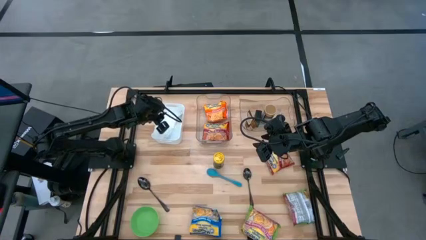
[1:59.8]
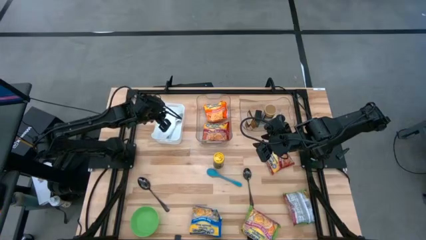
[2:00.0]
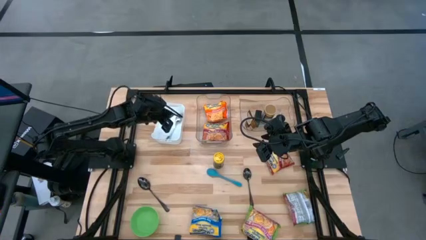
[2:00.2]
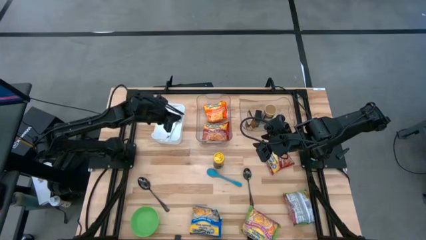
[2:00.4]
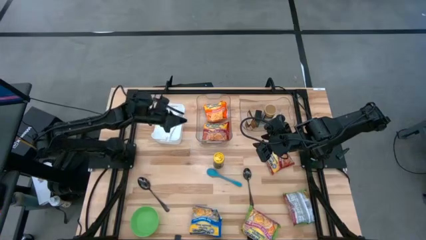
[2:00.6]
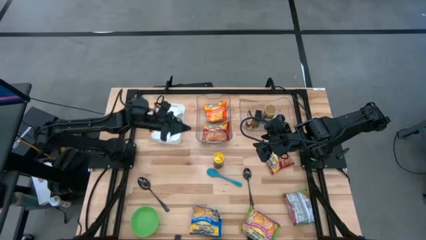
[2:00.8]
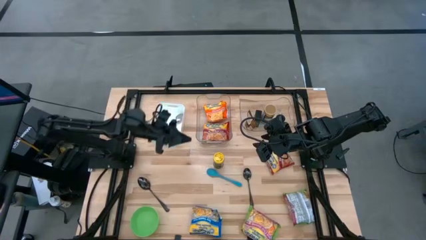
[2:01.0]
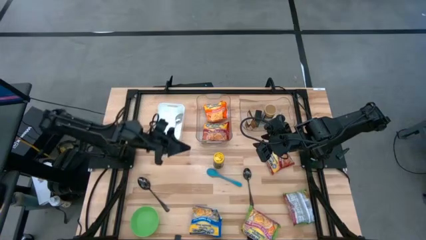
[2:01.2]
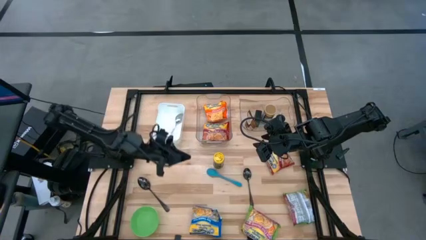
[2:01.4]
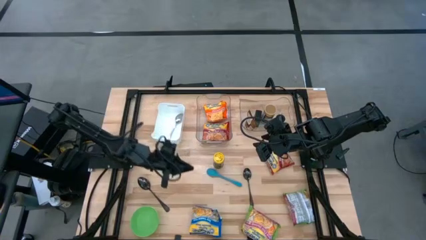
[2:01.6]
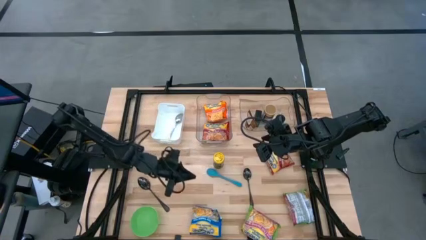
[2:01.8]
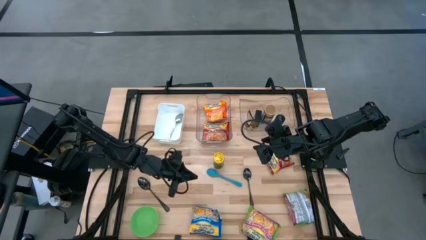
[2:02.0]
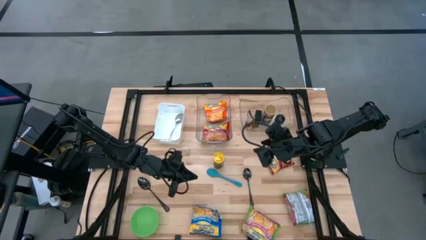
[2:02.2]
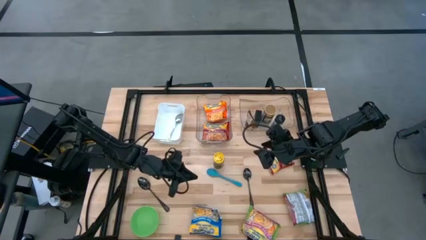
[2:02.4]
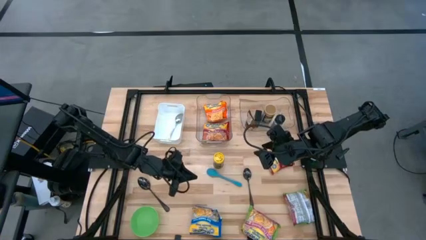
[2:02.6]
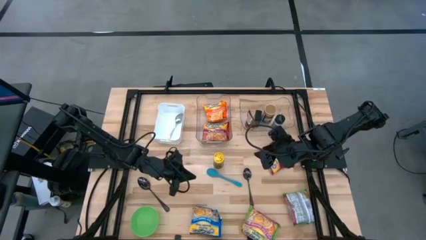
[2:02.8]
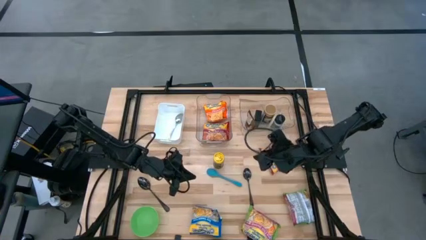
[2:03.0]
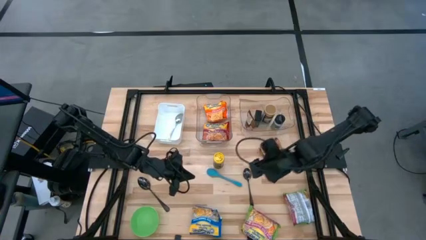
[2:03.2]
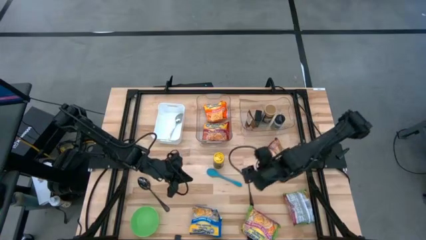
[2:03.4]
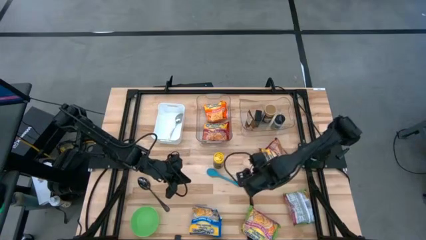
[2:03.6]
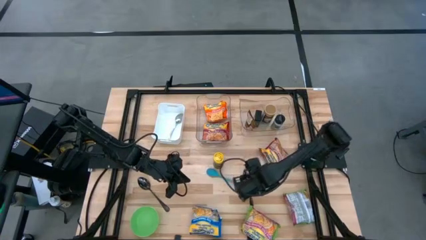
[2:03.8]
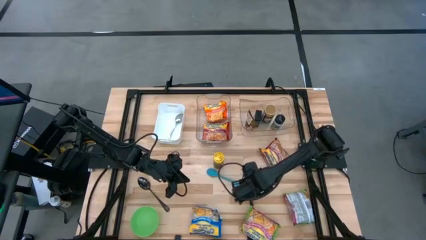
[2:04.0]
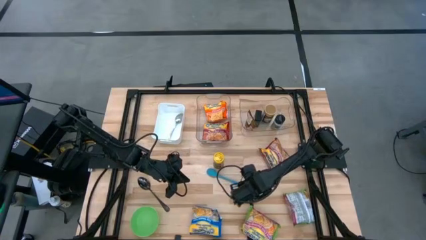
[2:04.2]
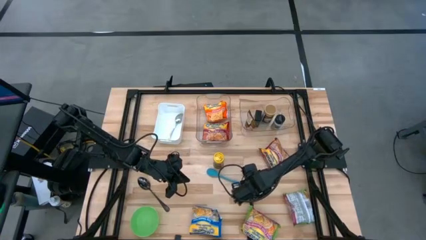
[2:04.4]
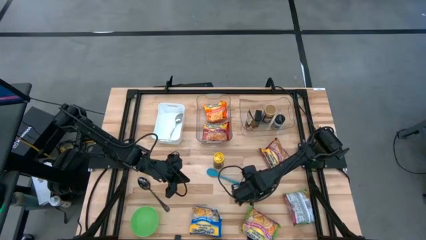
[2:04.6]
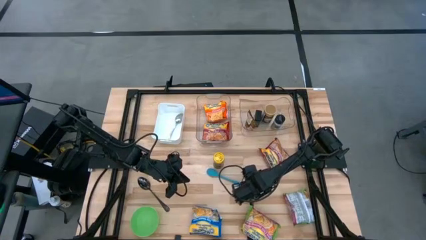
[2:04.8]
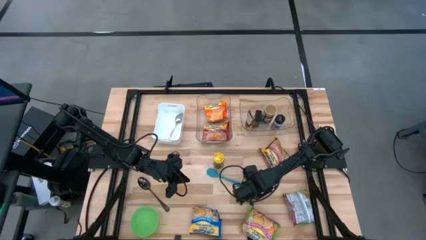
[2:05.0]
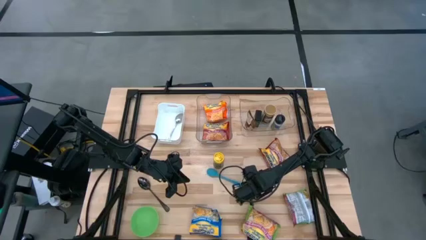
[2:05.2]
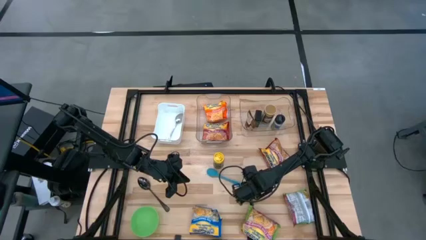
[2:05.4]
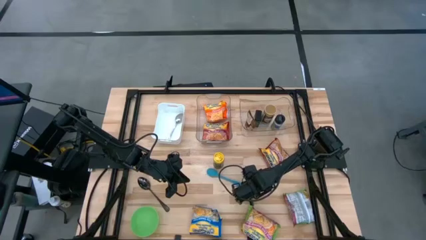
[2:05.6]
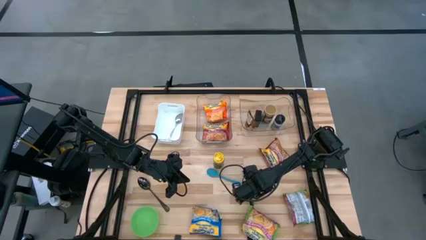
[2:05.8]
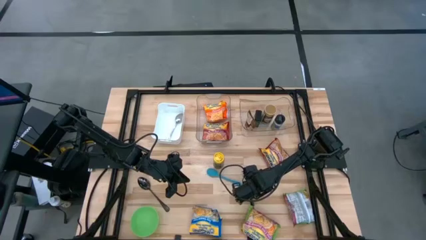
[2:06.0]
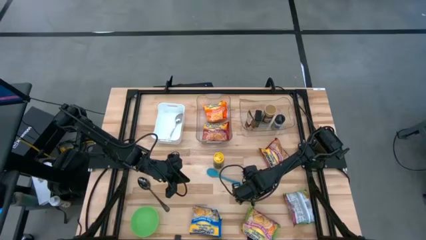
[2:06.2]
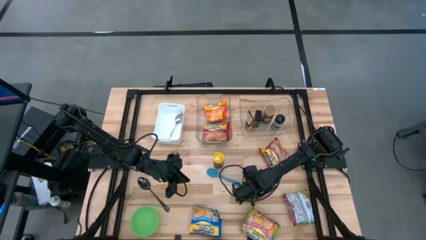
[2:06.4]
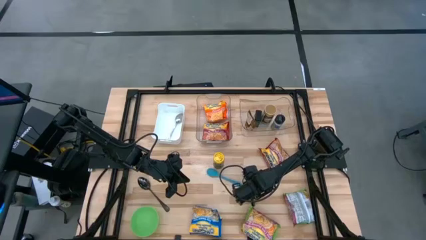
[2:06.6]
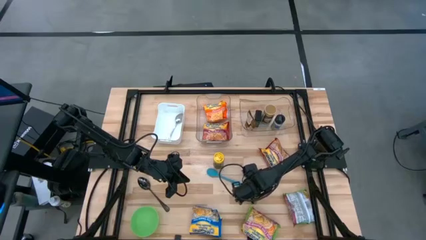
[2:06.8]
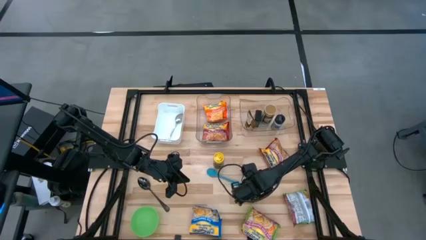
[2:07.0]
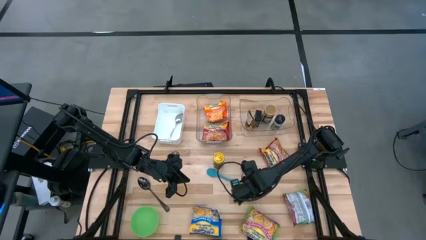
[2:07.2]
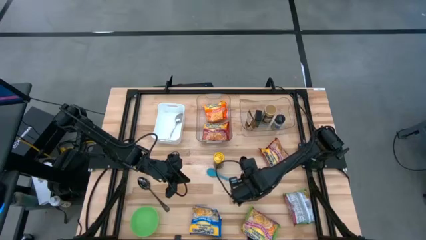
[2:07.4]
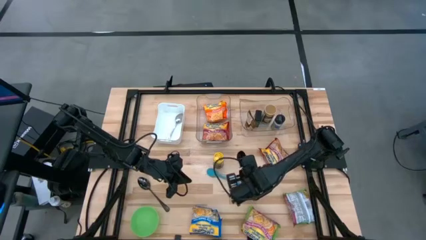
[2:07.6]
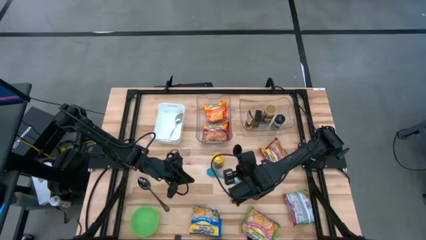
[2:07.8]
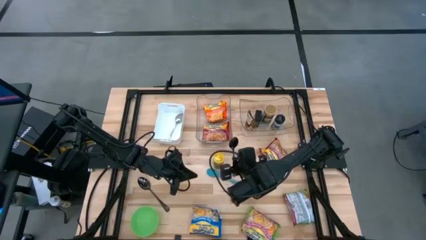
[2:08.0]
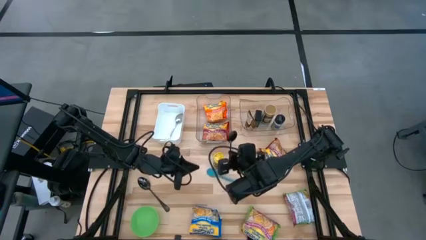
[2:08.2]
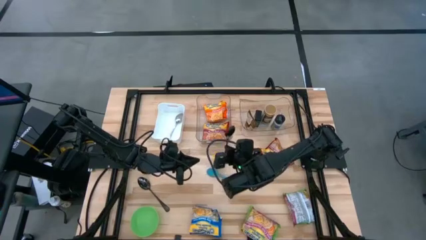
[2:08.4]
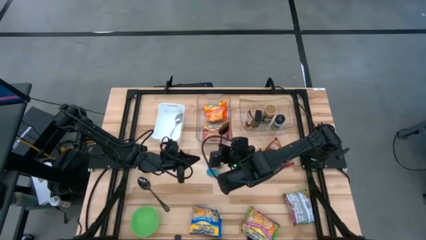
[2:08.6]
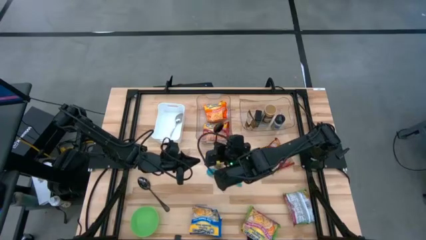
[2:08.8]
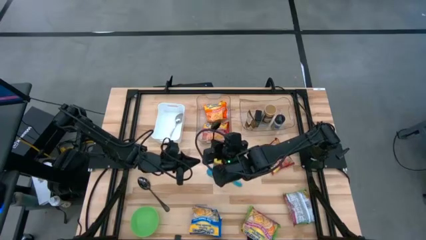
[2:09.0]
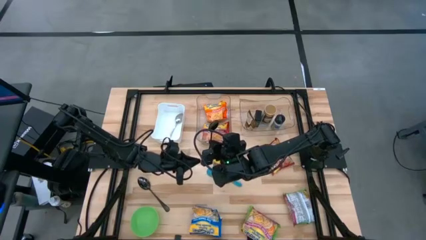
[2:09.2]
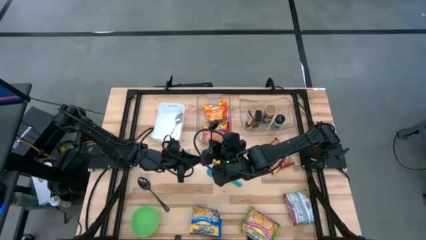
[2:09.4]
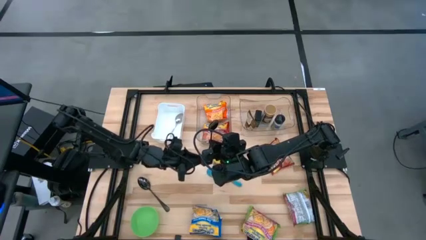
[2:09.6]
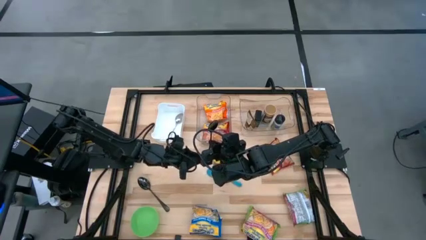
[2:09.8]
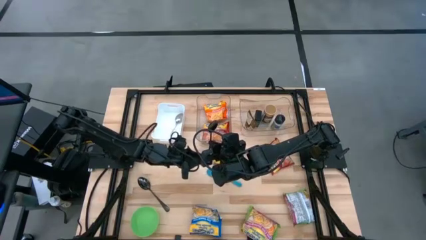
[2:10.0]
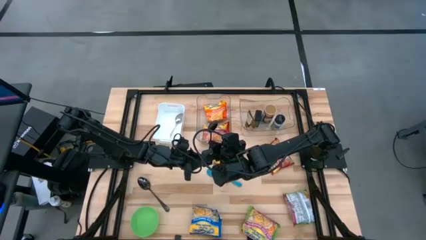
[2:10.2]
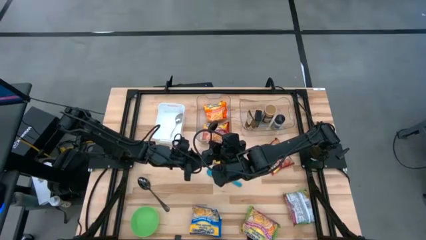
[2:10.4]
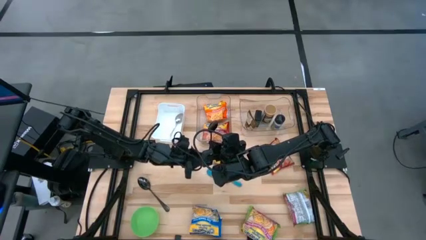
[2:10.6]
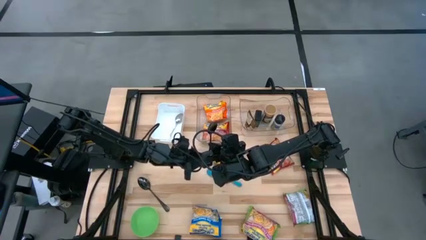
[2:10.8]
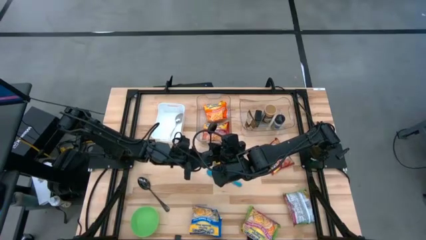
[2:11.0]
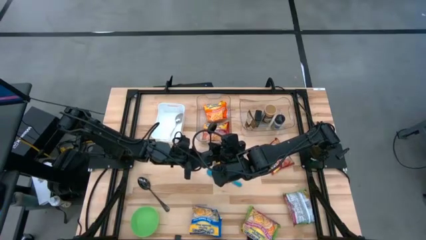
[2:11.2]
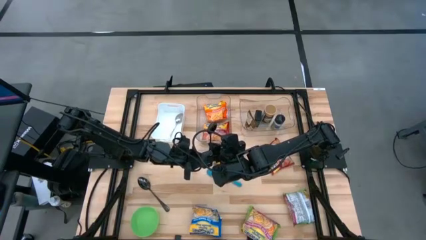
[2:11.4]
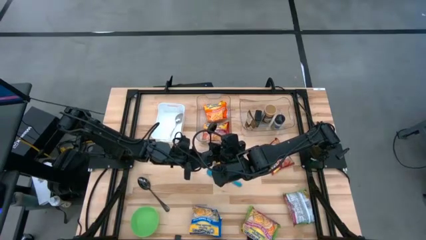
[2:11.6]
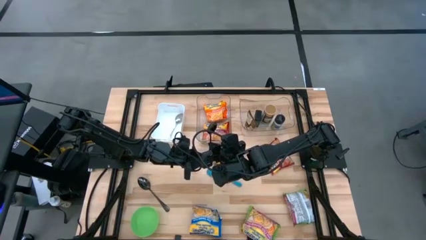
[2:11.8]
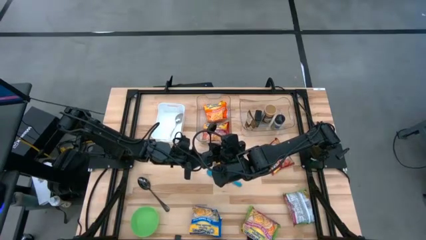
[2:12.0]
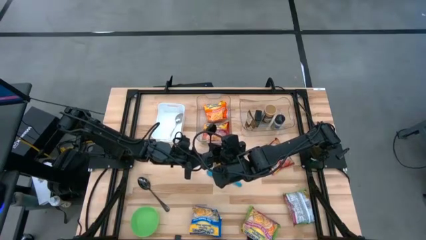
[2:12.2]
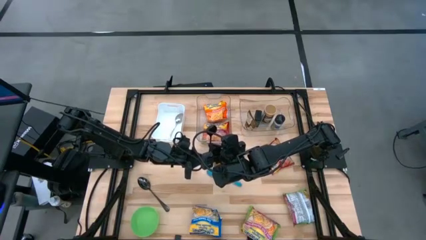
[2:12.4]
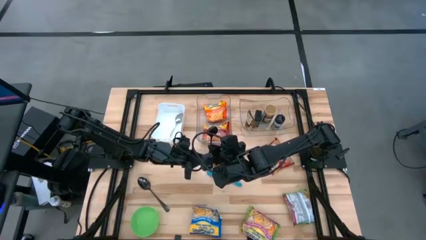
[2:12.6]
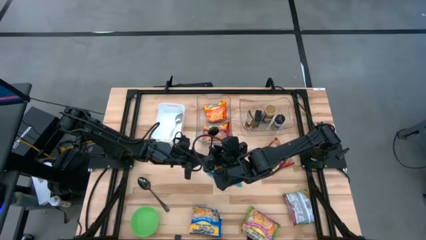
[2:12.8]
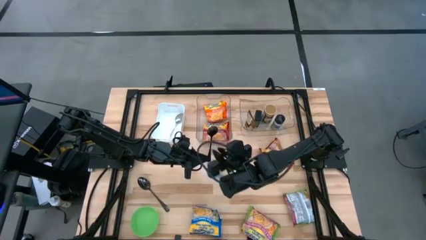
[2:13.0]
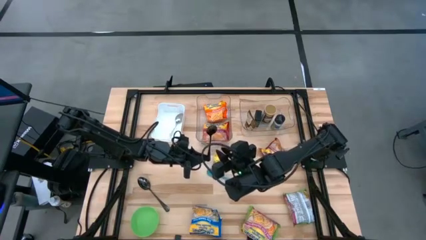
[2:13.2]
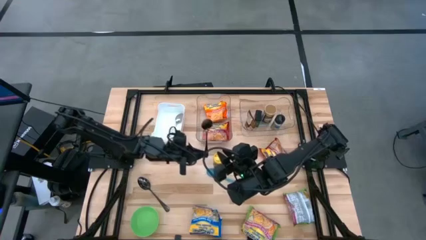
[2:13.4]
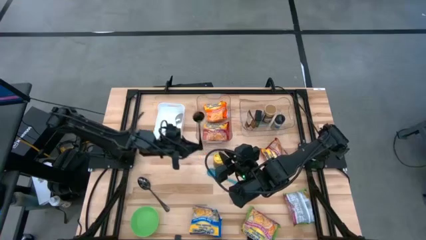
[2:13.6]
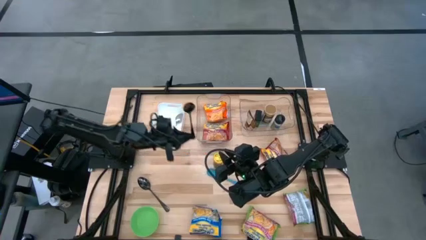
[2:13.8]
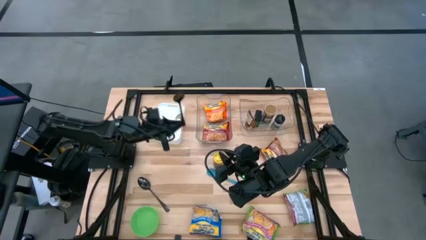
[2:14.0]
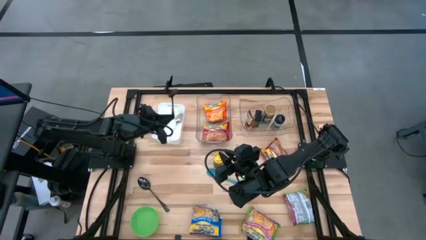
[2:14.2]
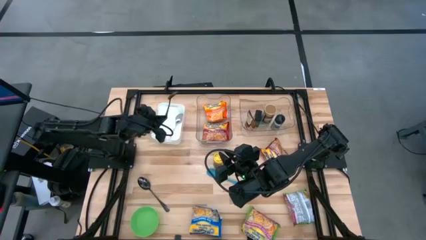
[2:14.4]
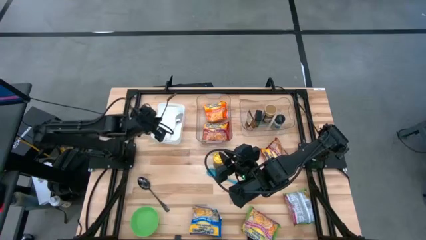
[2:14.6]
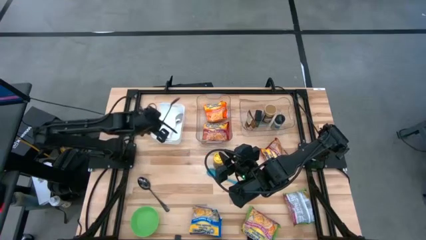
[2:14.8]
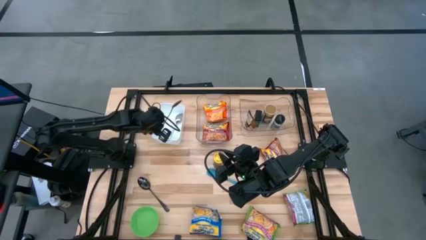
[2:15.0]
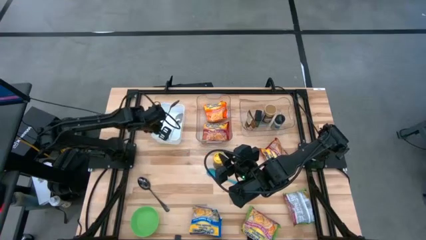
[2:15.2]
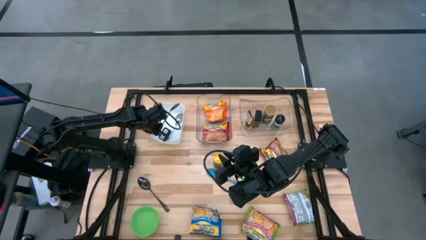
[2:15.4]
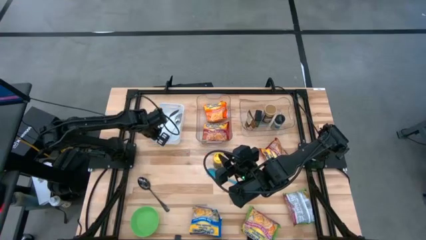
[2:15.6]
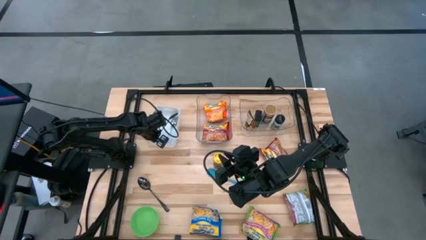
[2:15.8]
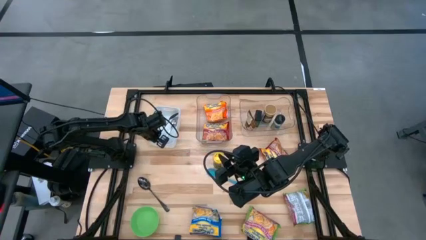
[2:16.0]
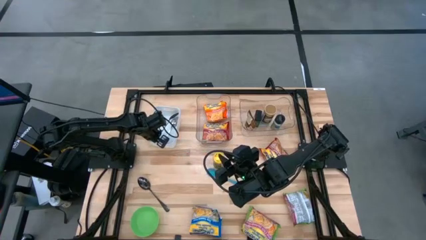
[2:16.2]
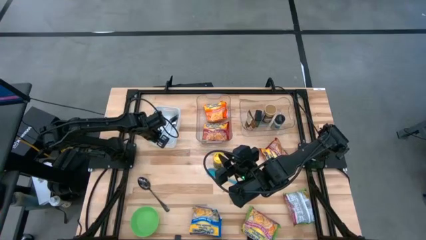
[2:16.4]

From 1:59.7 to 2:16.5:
Task: Pick & Place Food Item
Put the right black spoon into the white bin

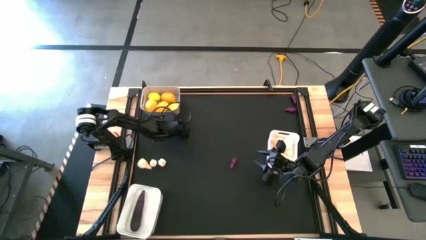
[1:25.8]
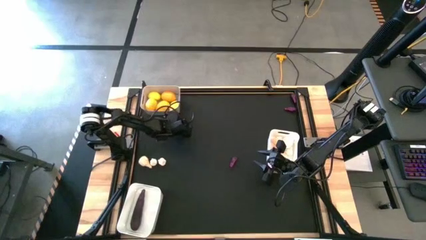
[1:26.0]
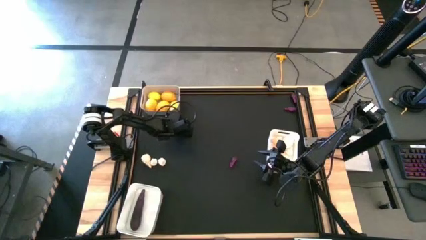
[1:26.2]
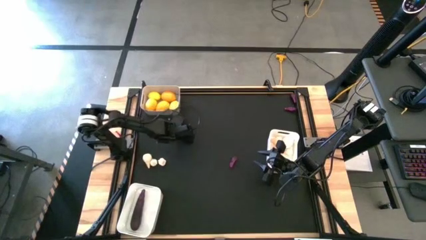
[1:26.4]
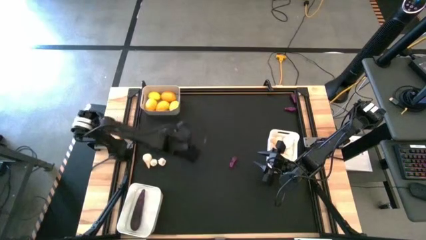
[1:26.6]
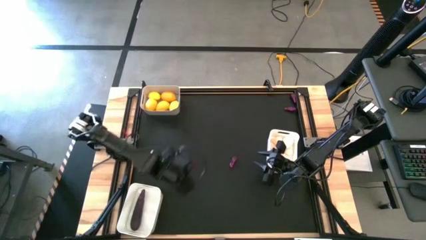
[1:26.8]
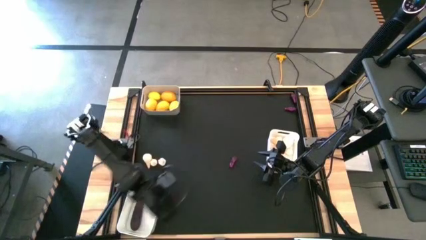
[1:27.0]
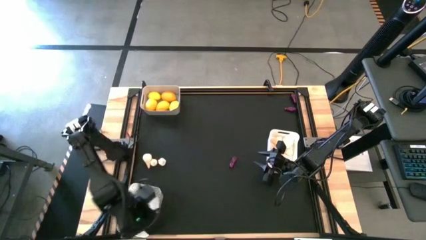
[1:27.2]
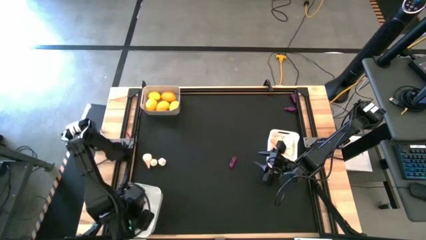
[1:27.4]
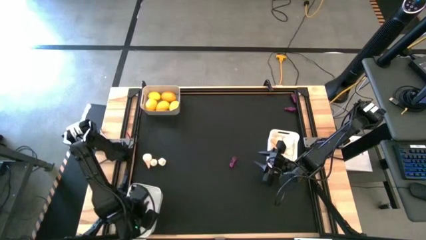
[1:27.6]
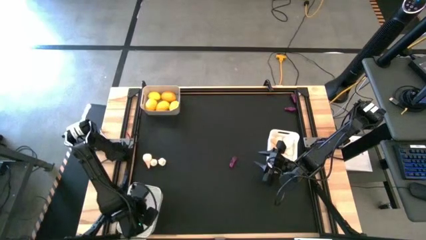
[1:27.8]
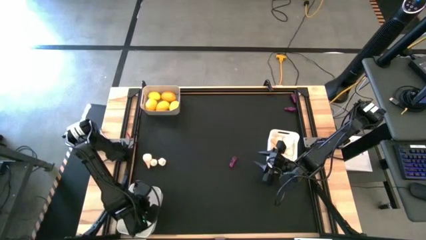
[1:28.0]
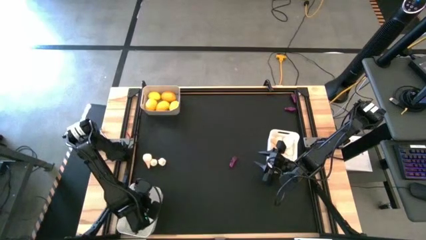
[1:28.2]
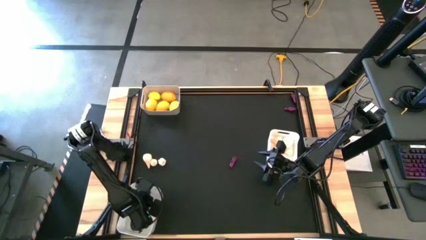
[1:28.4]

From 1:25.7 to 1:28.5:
Task: Sort produce into baskets
Put the bottom left eggplant into the bottom left white bin
